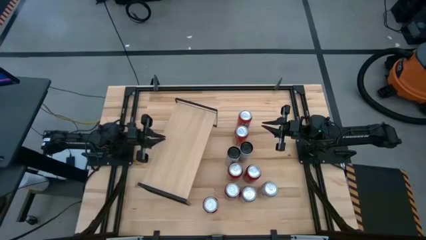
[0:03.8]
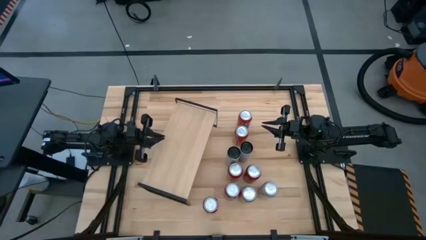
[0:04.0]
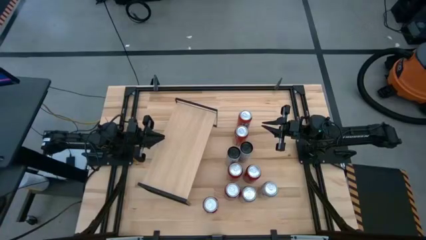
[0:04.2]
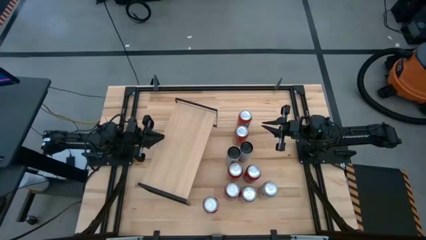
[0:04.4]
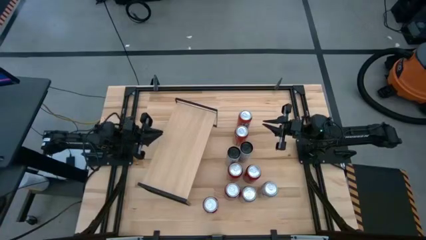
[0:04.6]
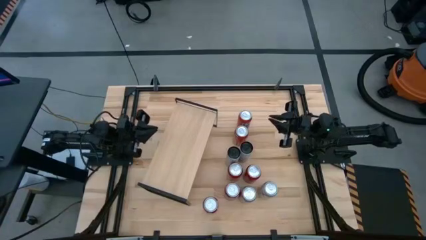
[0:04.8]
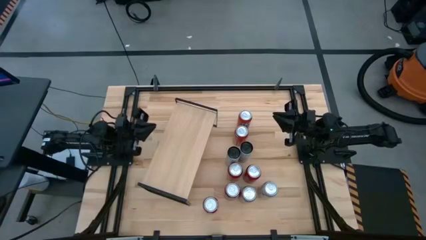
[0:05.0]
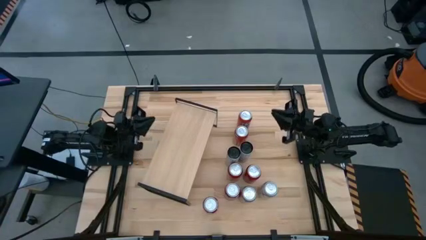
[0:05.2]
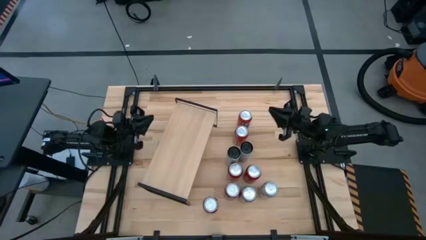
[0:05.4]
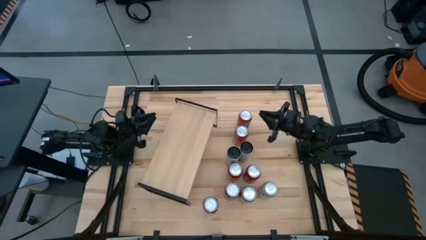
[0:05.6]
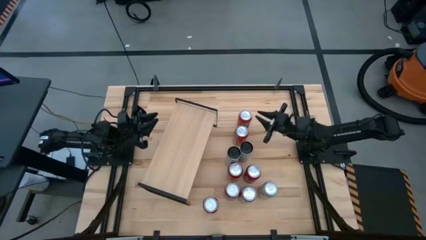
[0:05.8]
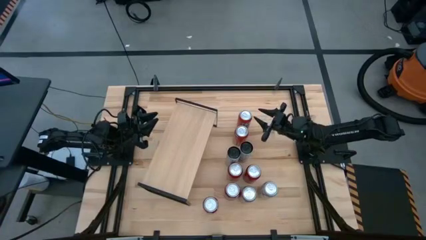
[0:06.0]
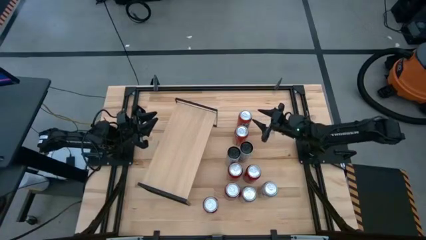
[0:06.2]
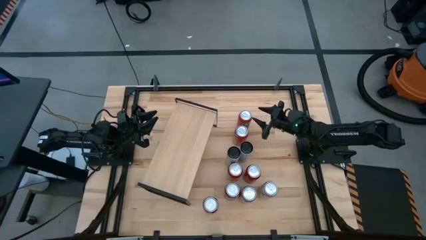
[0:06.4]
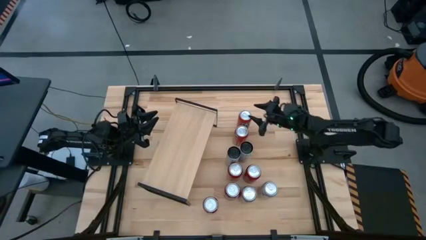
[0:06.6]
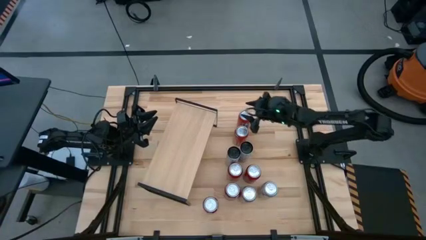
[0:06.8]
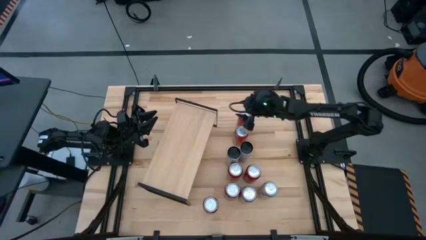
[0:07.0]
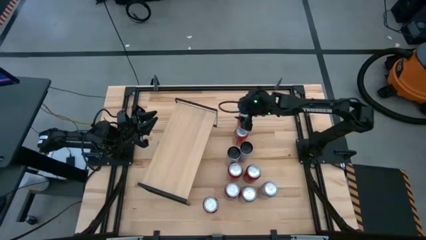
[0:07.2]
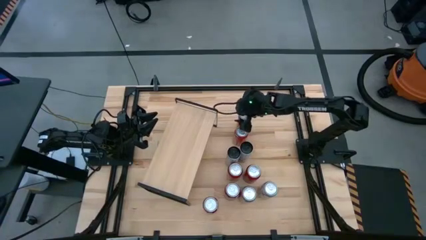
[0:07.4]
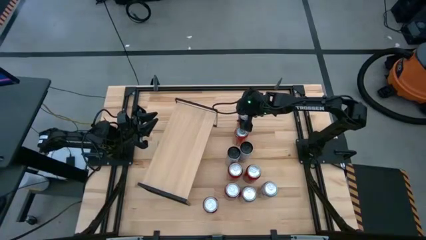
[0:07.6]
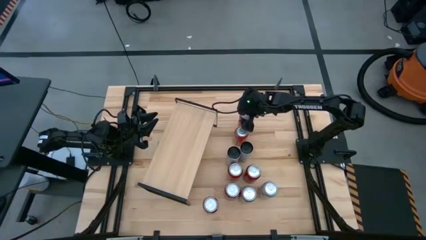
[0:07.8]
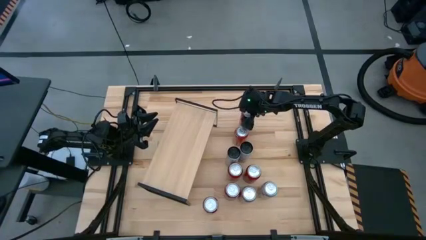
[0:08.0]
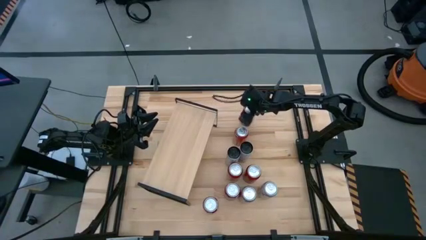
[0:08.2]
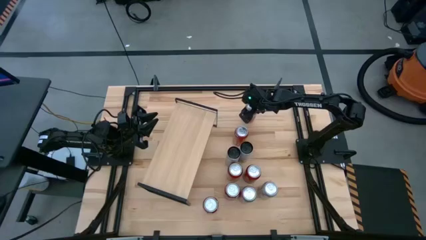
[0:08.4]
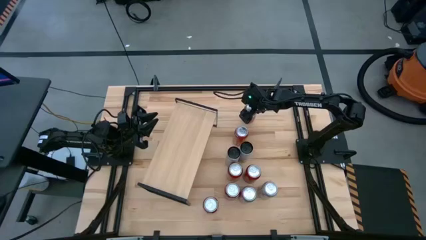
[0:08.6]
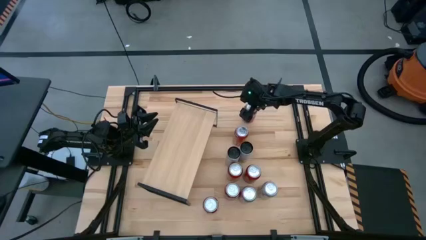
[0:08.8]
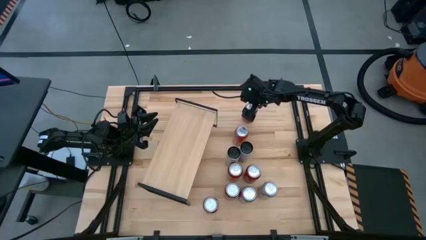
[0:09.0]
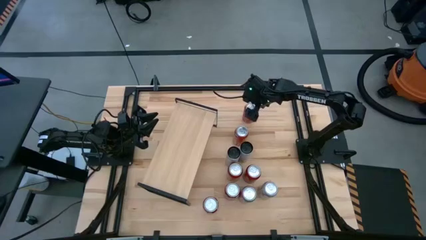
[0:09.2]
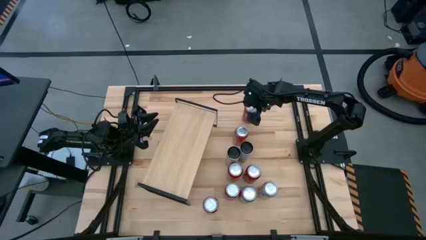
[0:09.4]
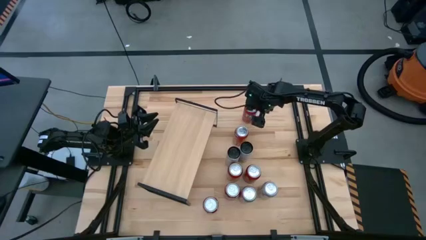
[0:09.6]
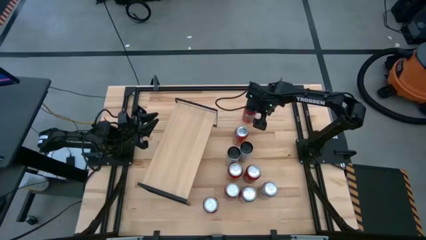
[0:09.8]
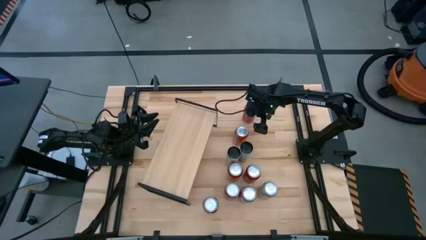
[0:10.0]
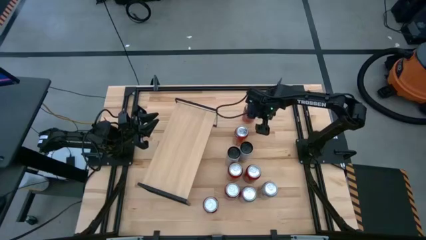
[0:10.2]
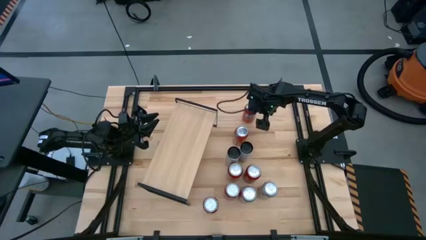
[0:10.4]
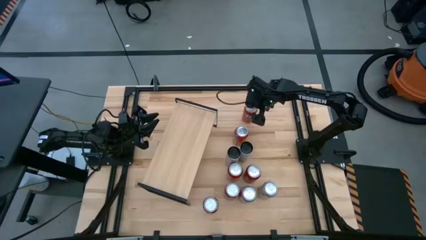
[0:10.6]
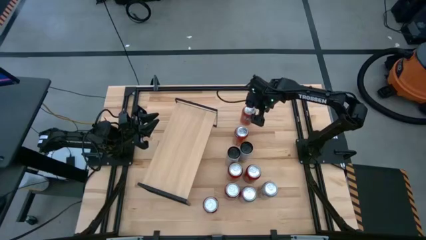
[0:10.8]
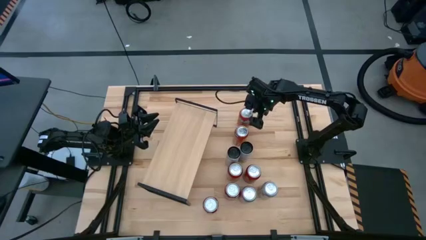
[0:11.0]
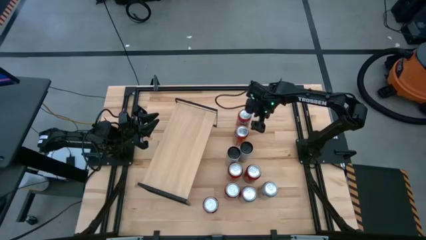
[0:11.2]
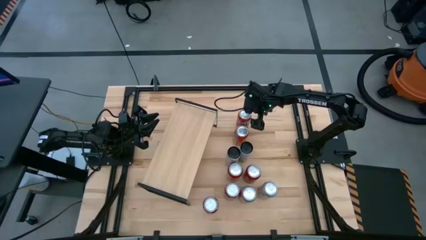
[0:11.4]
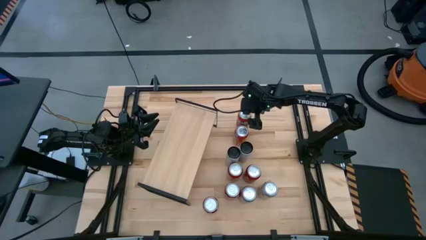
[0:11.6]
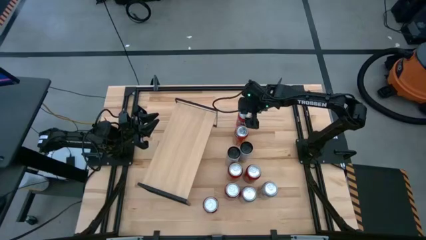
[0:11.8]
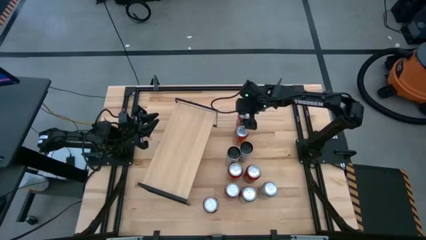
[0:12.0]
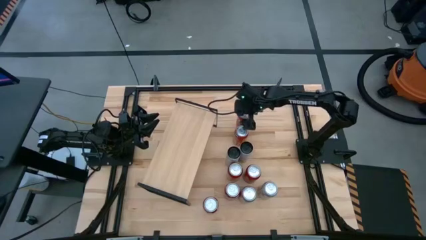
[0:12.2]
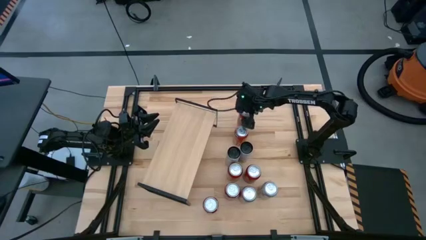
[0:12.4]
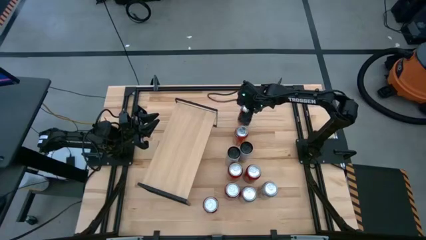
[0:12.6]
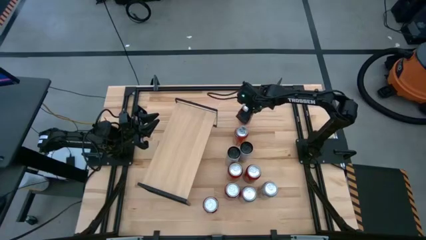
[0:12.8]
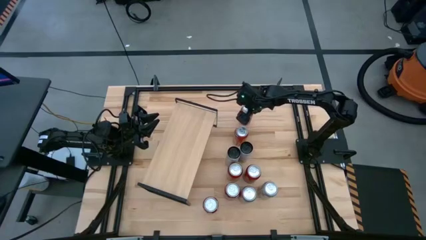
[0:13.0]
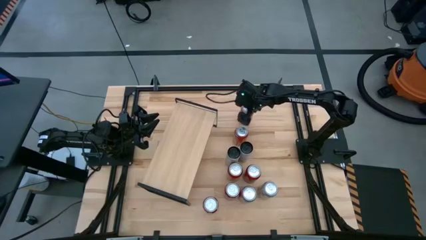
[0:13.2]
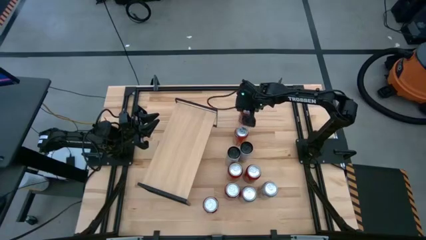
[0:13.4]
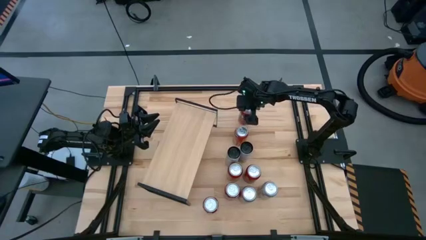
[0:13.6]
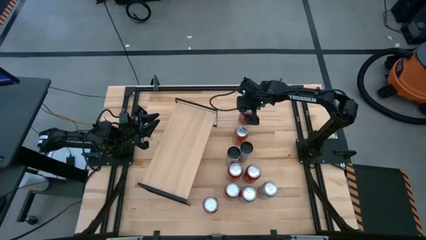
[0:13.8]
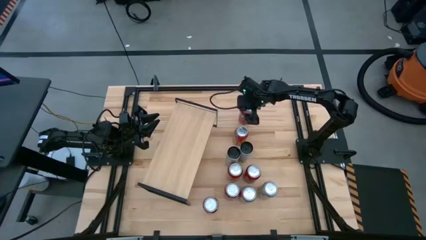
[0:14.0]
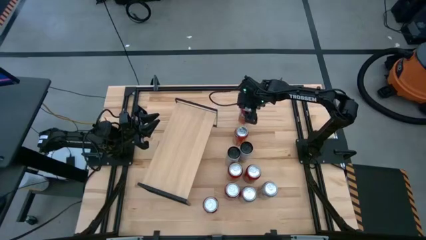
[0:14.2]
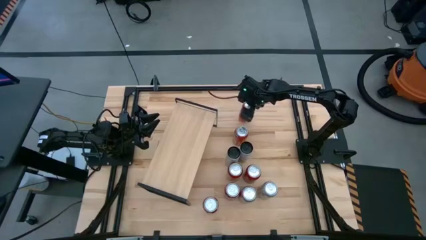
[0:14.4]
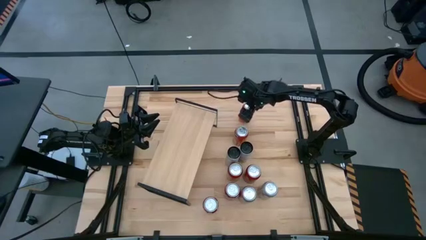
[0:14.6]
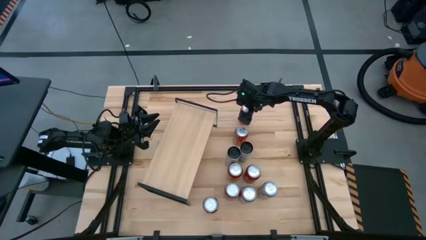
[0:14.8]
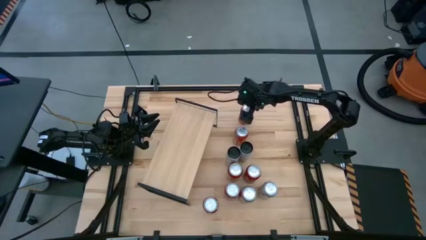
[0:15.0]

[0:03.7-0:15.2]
Task: Place canned beverage on shelf
Put the top orange soda can on the shelf
